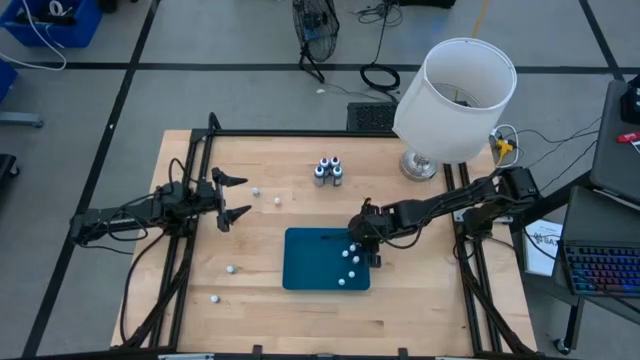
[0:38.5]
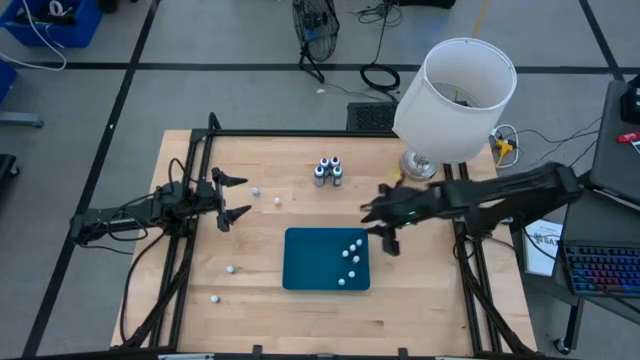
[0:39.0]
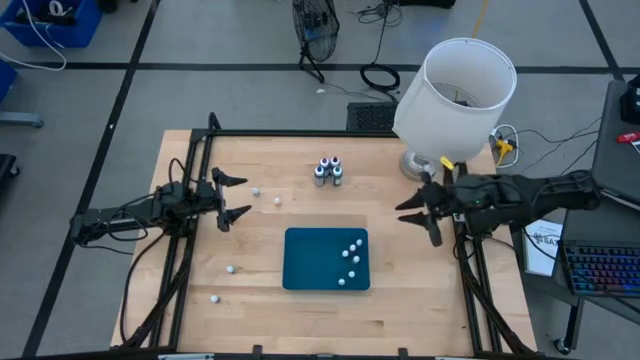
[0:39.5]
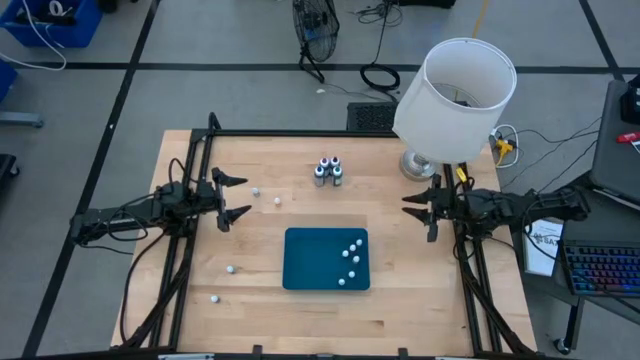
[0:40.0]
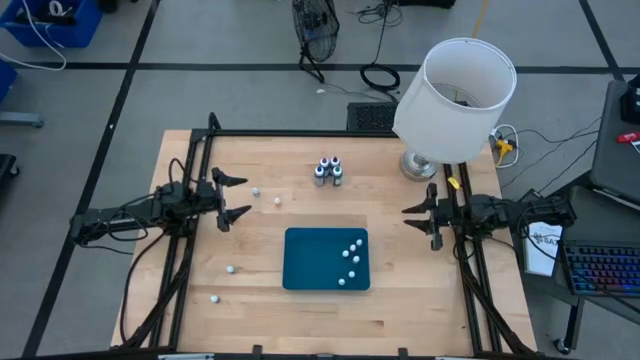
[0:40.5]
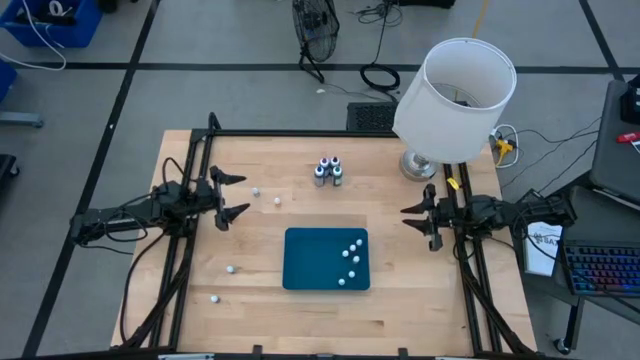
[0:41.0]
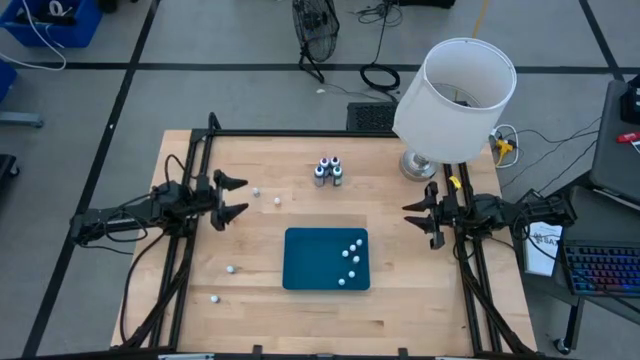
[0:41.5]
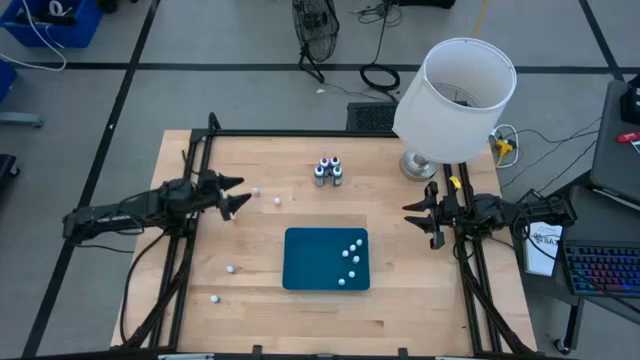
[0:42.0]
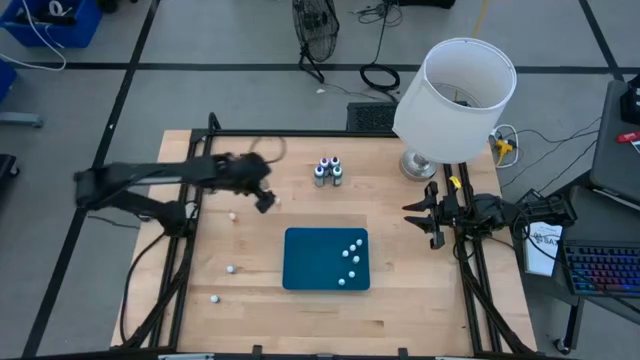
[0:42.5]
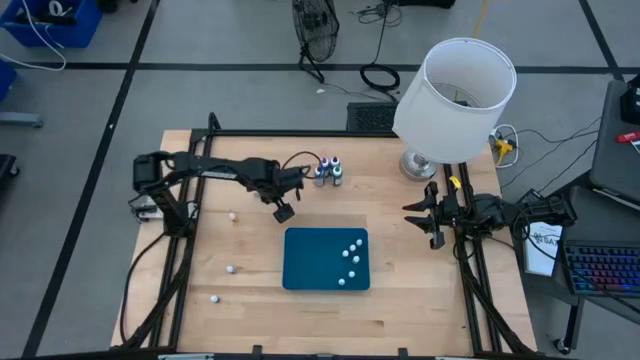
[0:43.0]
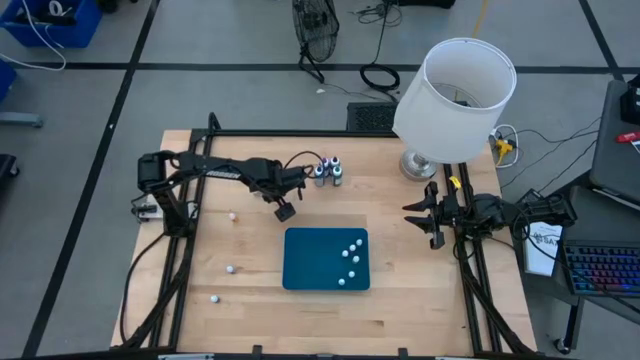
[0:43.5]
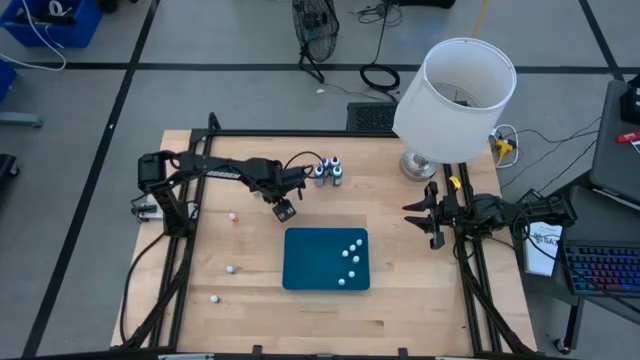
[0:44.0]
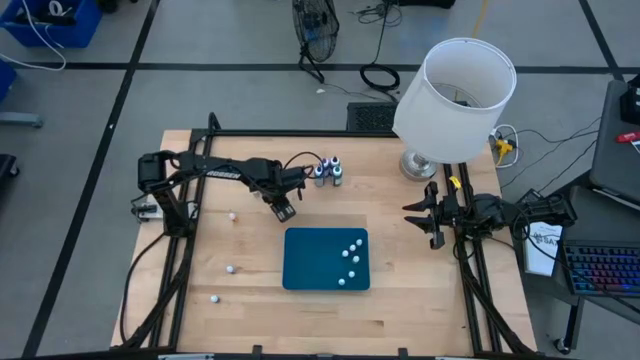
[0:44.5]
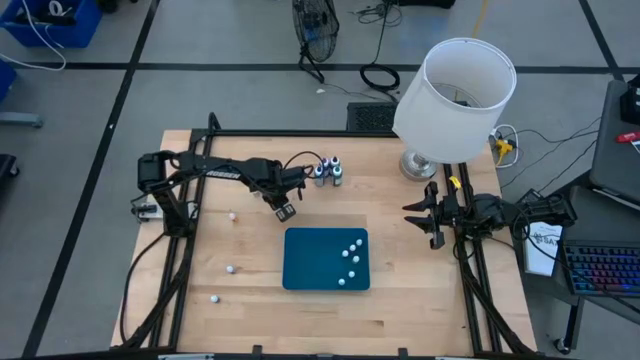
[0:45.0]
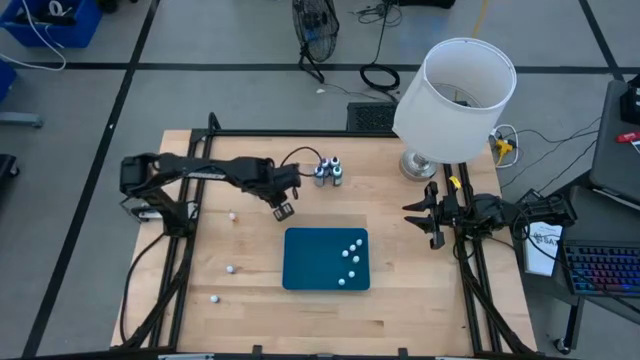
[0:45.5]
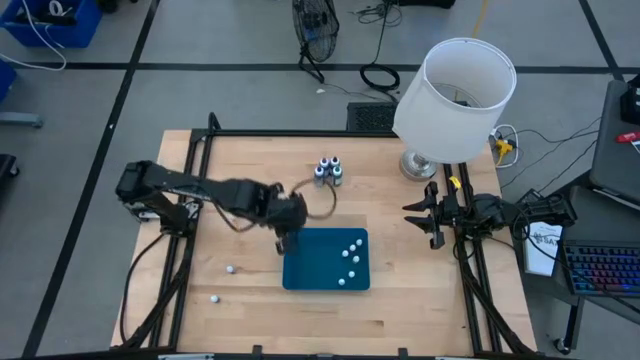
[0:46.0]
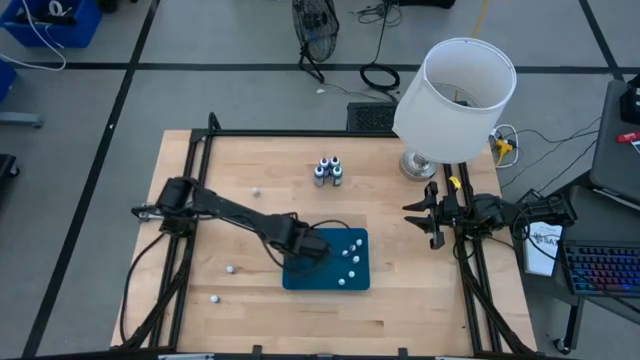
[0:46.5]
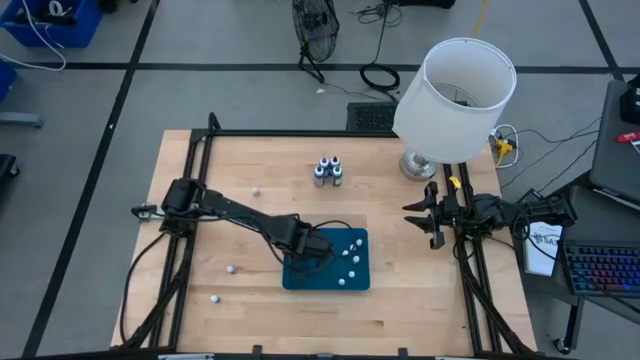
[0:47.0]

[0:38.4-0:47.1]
Task: Pick & Place food coloring
Put the yellow food coloring bottle into the bin

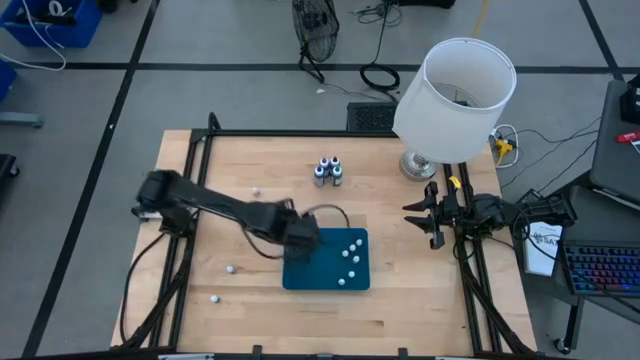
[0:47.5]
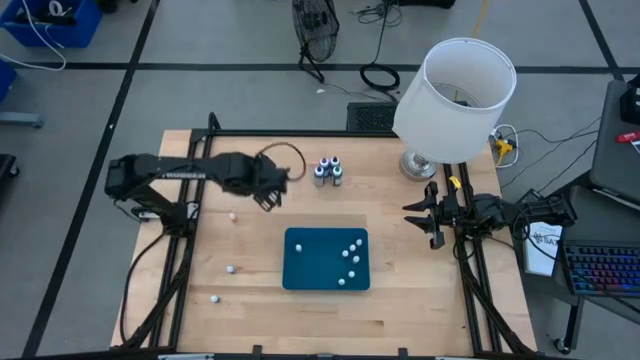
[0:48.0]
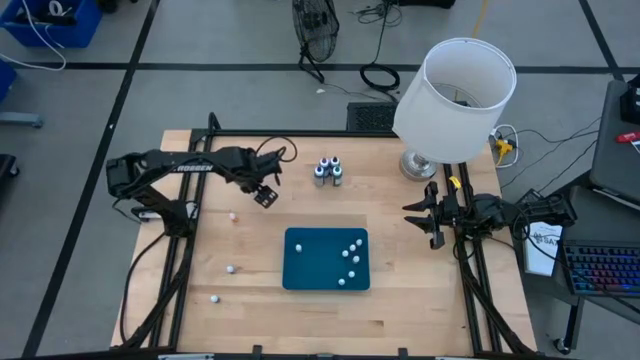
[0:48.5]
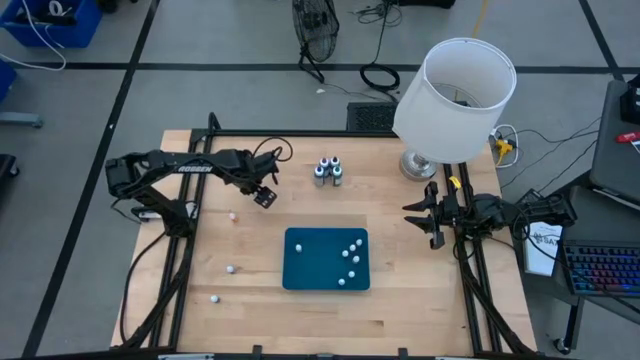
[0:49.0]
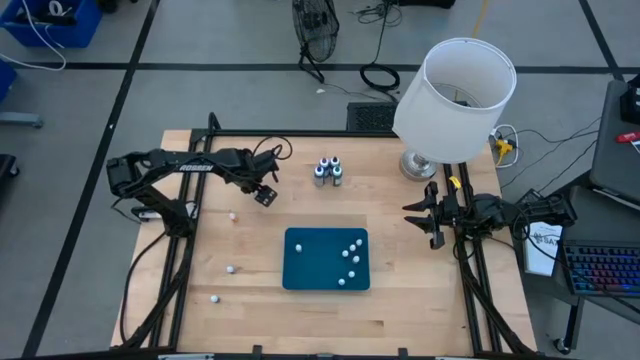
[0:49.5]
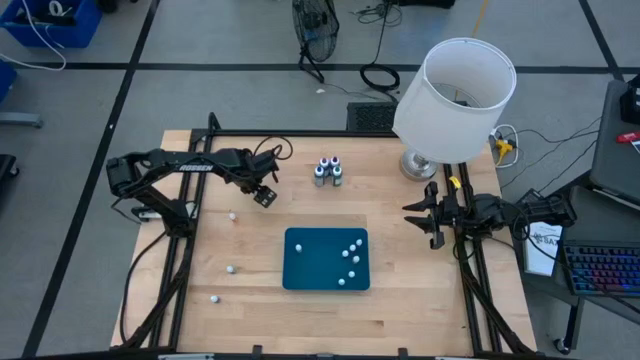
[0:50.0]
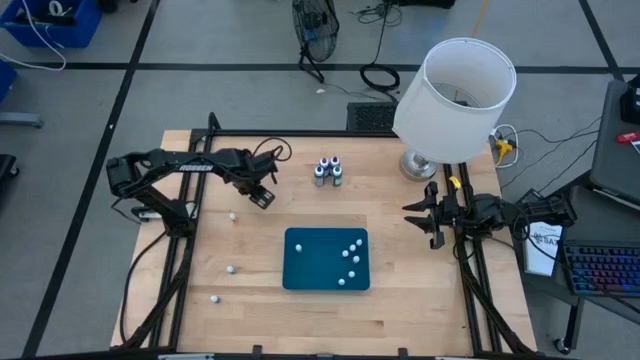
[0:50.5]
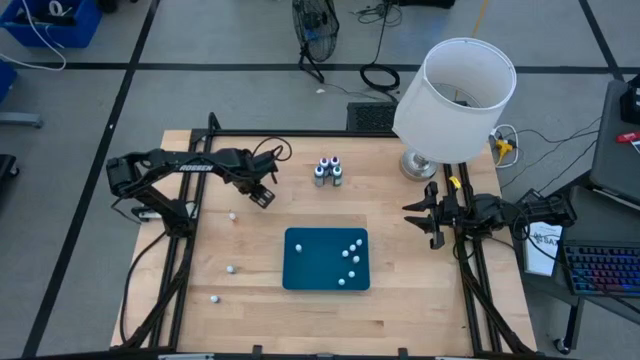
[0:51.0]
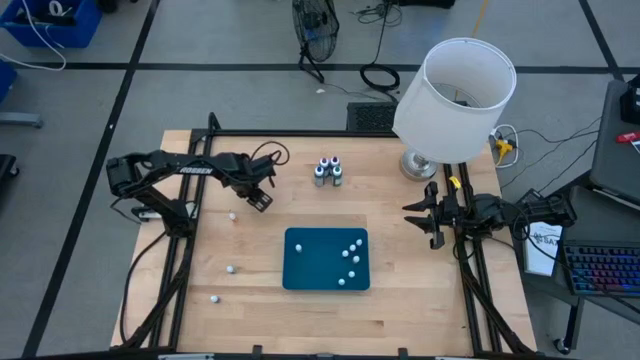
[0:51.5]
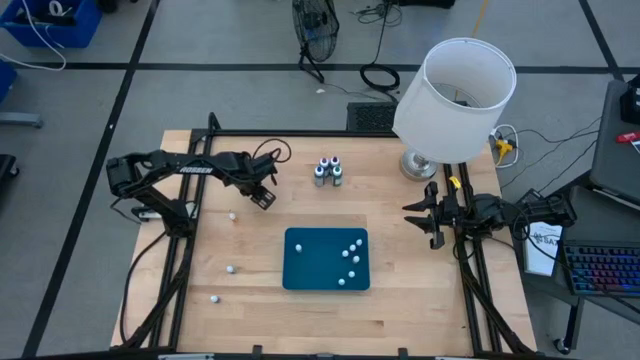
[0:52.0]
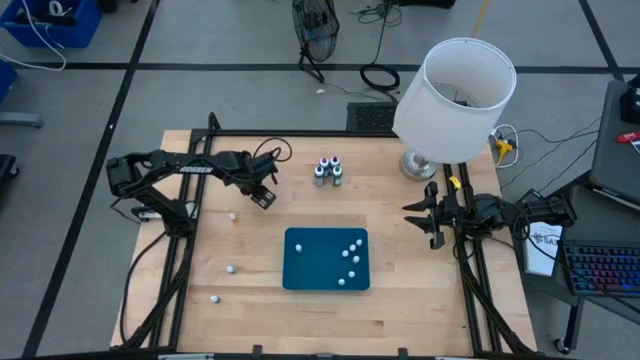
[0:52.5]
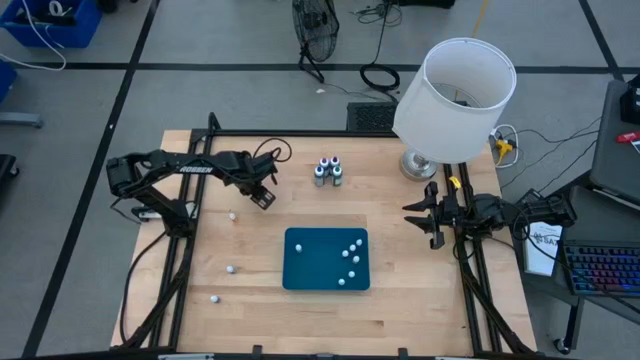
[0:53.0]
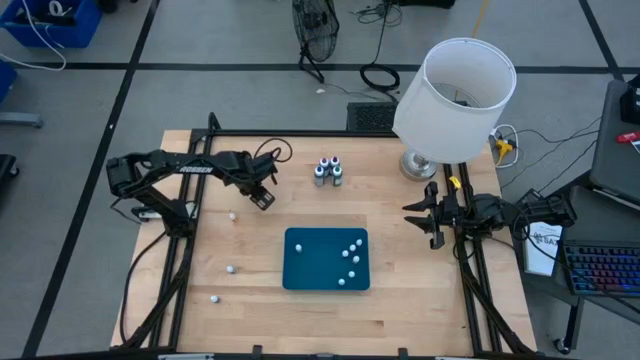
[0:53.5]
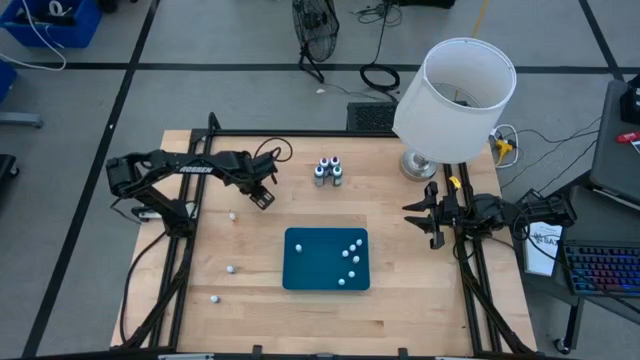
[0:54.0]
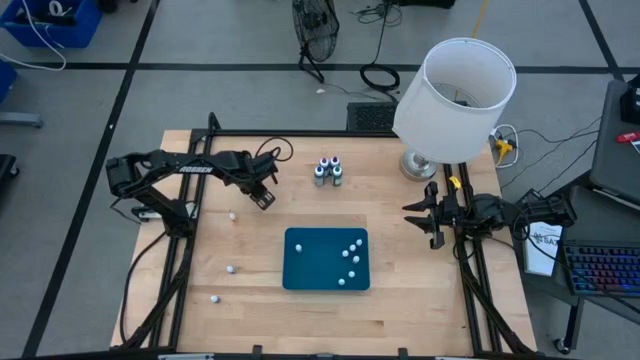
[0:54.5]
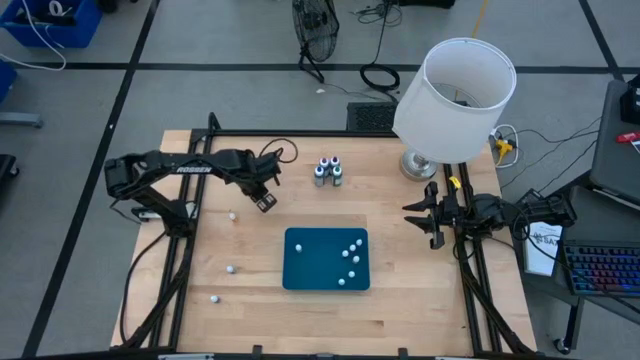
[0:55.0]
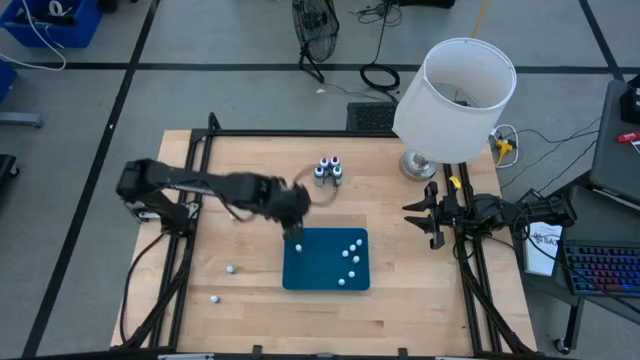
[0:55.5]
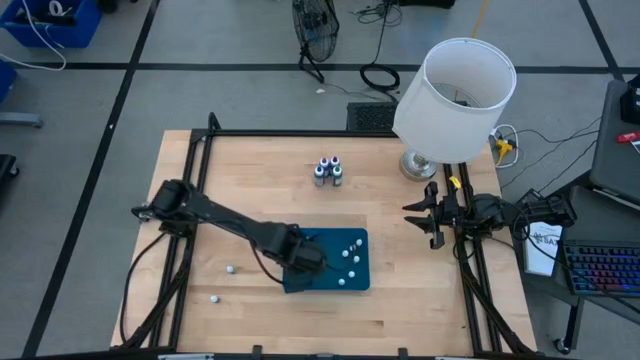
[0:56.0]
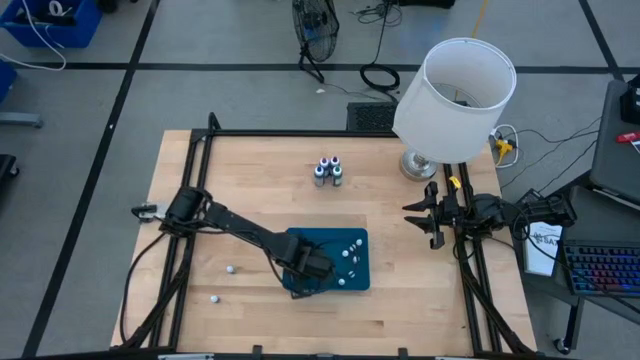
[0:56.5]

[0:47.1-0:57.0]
Put the blue food coloring bottle into the bin

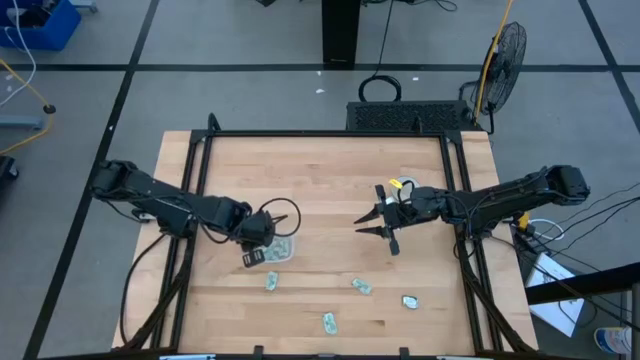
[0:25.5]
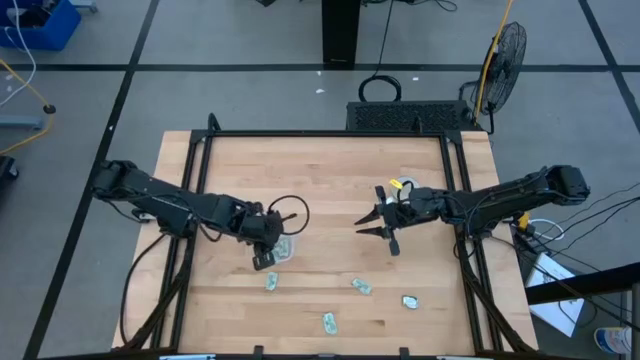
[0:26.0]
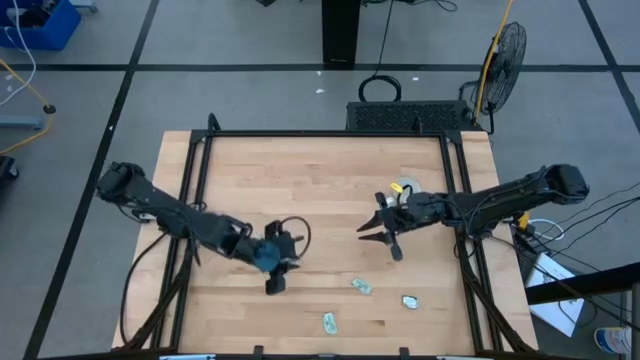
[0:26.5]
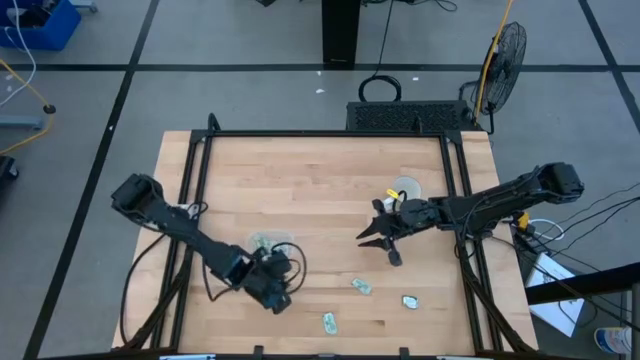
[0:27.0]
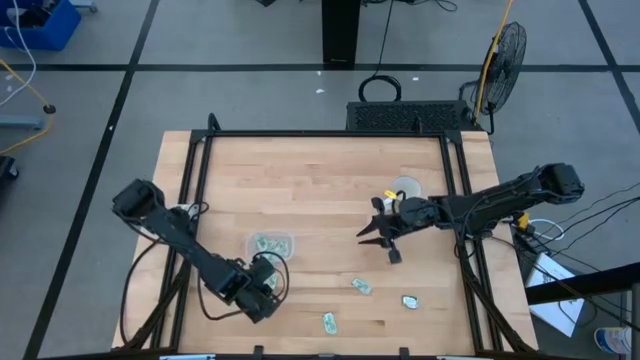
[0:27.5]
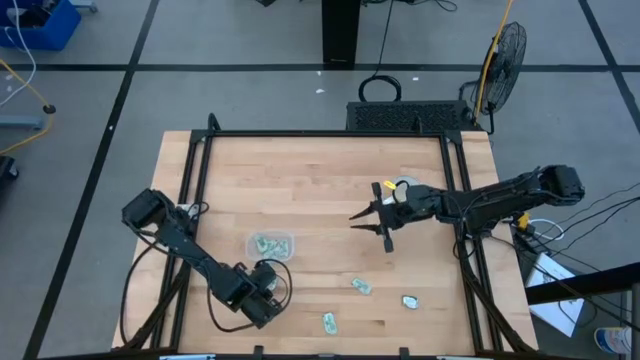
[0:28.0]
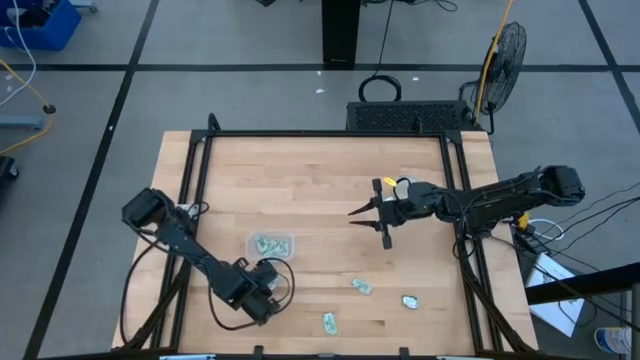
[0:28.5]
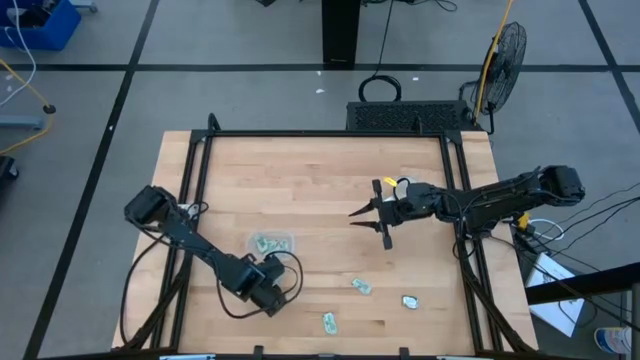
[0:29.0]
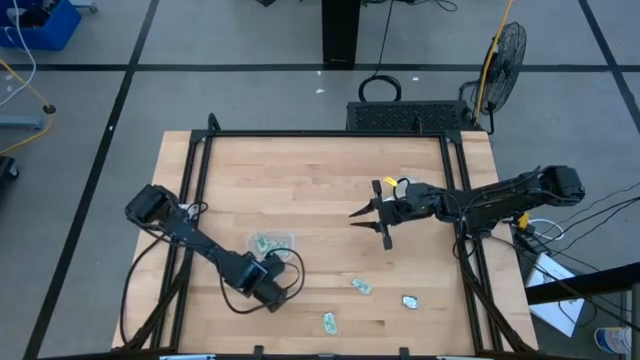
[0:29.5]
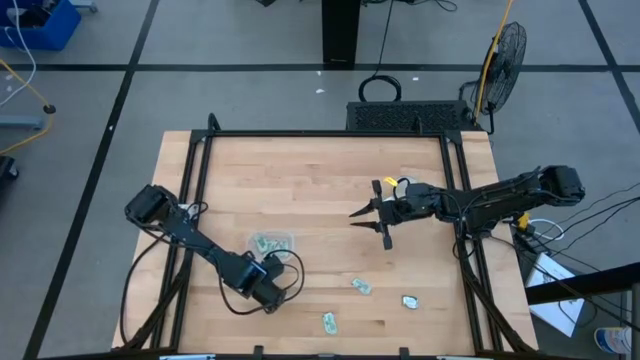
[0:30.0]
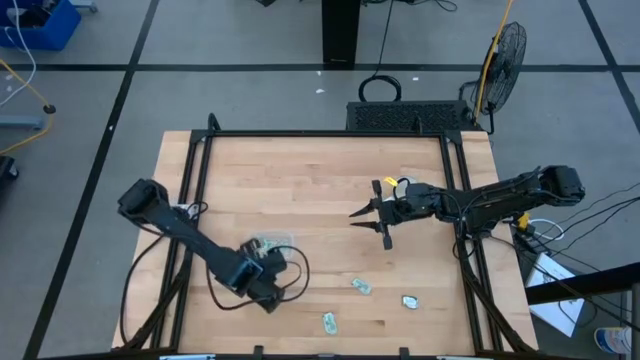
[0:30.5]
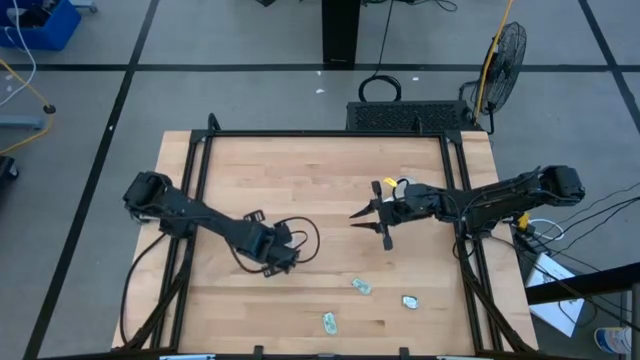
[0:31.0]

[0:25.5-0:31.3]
Task: Pick and place Stevia / Truvia into bins
Put the stevia packet into the transparent bin
